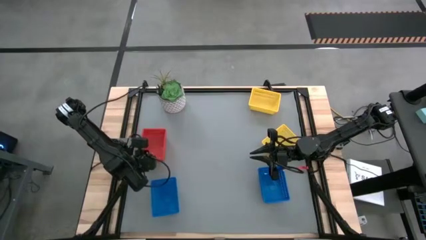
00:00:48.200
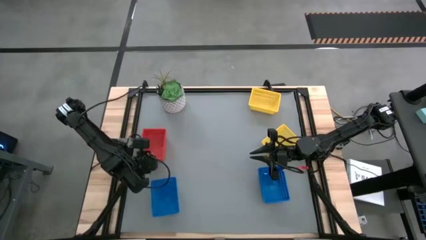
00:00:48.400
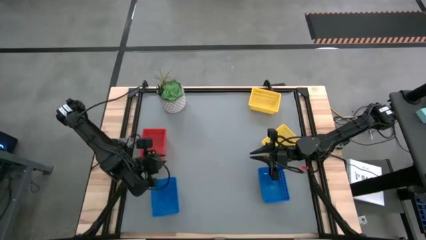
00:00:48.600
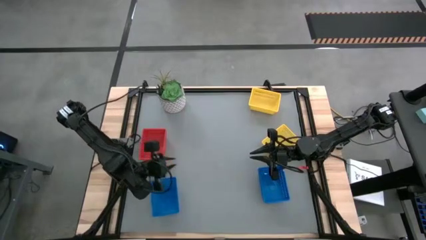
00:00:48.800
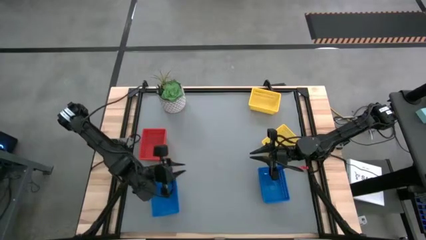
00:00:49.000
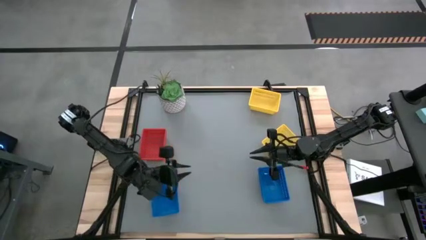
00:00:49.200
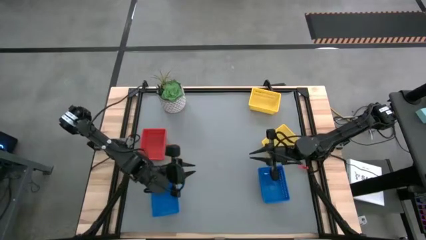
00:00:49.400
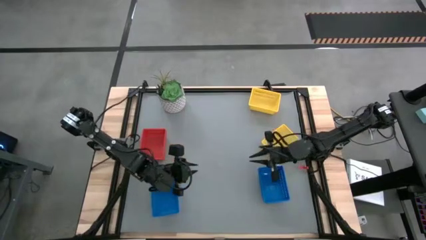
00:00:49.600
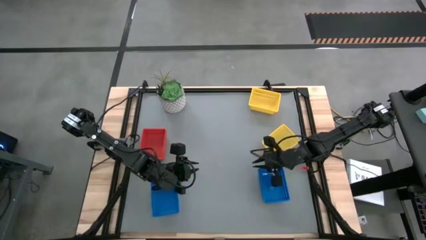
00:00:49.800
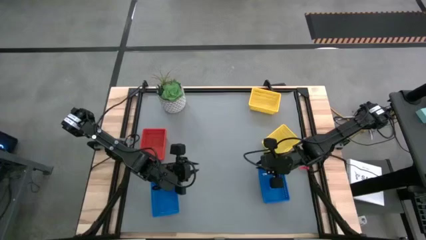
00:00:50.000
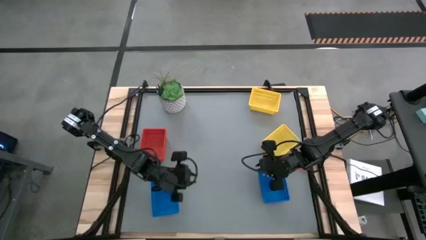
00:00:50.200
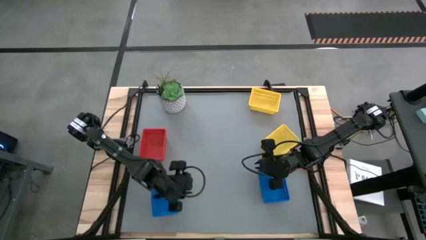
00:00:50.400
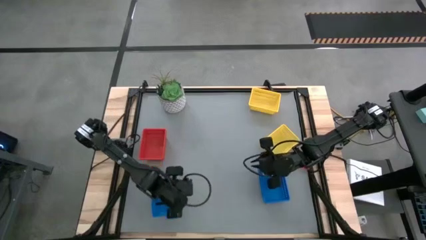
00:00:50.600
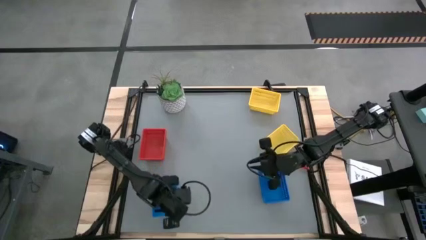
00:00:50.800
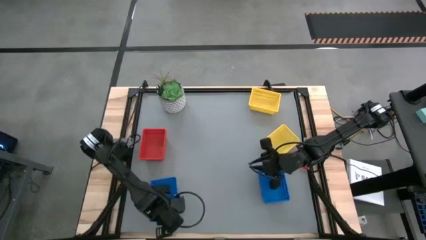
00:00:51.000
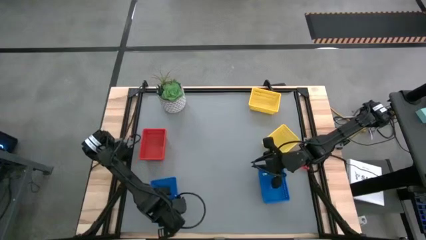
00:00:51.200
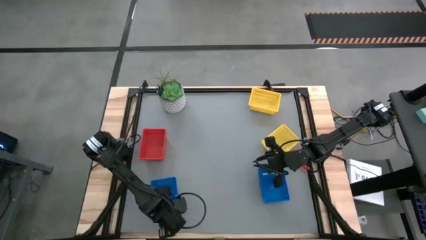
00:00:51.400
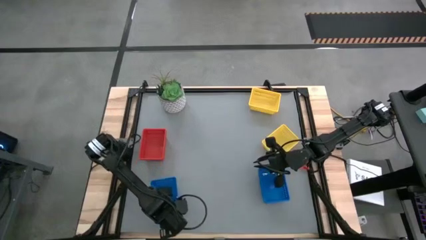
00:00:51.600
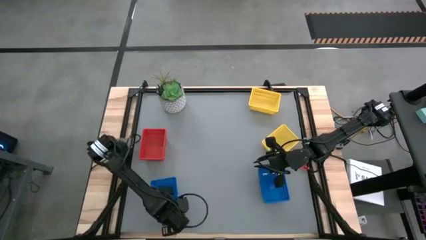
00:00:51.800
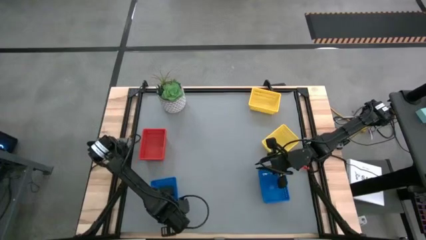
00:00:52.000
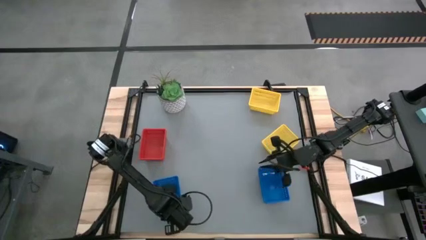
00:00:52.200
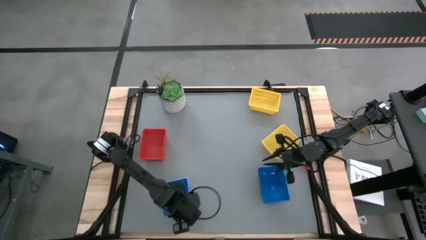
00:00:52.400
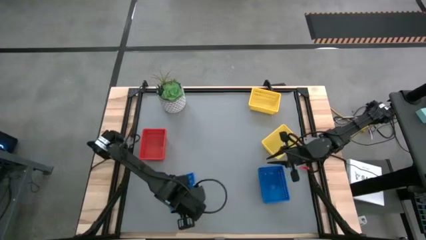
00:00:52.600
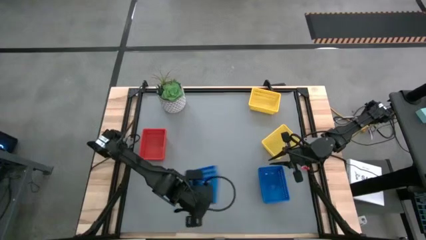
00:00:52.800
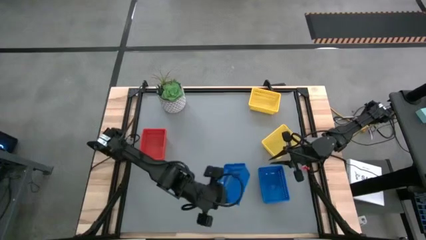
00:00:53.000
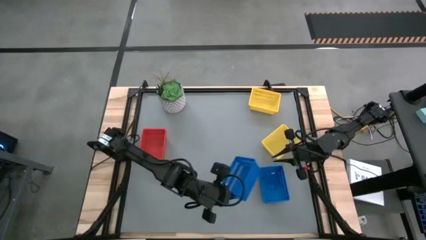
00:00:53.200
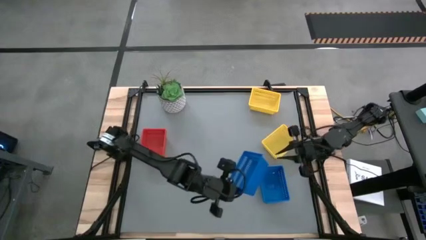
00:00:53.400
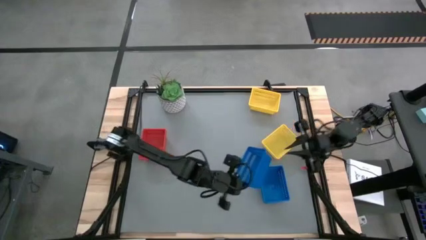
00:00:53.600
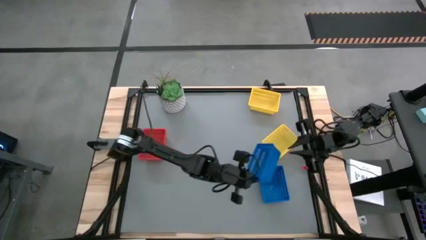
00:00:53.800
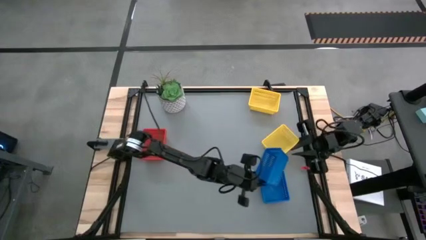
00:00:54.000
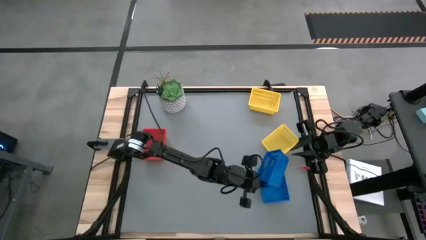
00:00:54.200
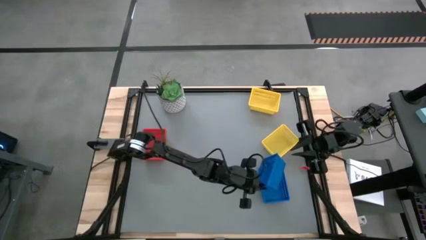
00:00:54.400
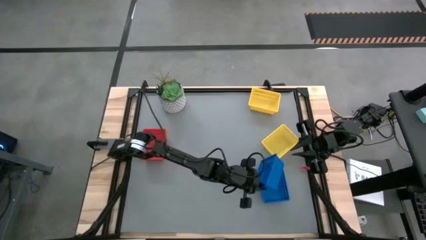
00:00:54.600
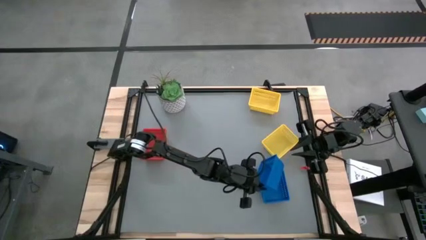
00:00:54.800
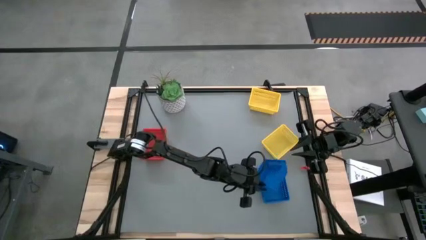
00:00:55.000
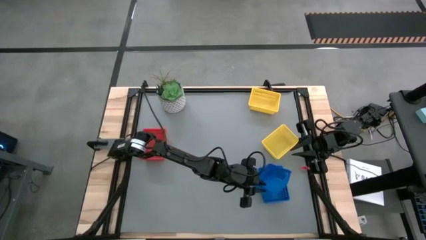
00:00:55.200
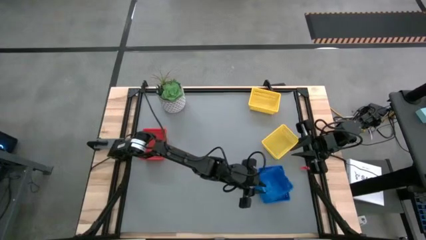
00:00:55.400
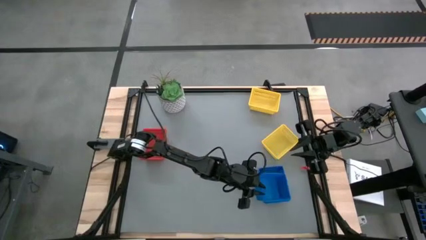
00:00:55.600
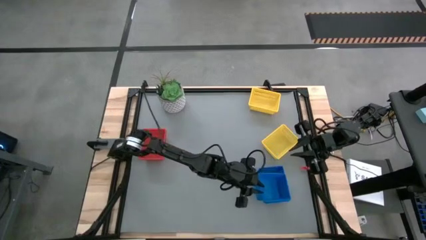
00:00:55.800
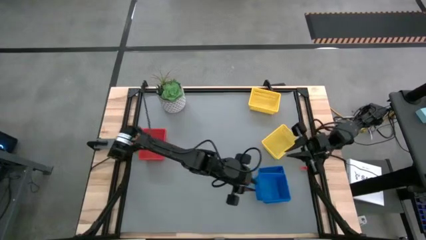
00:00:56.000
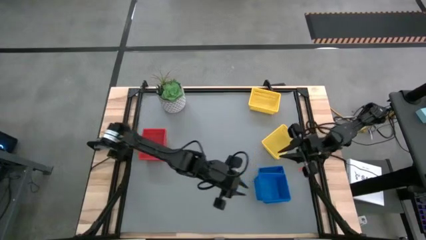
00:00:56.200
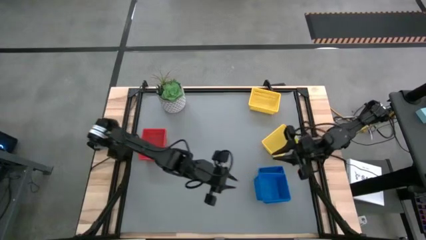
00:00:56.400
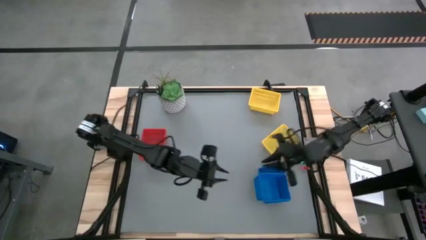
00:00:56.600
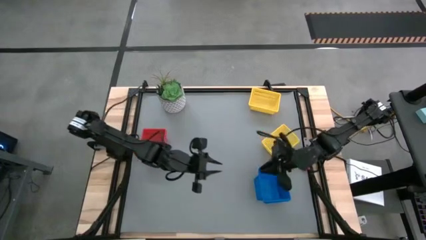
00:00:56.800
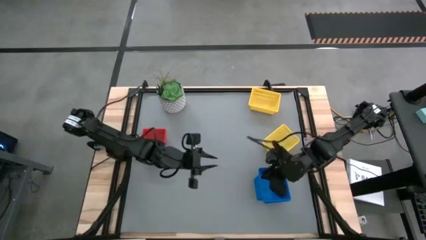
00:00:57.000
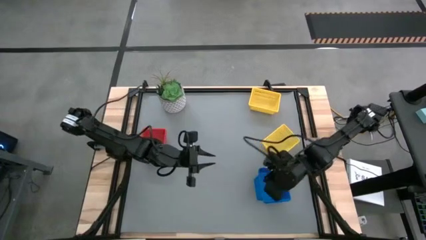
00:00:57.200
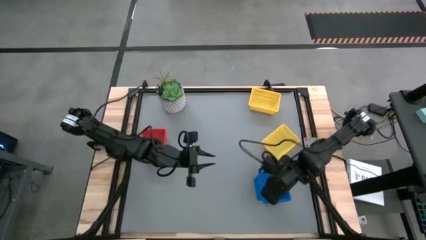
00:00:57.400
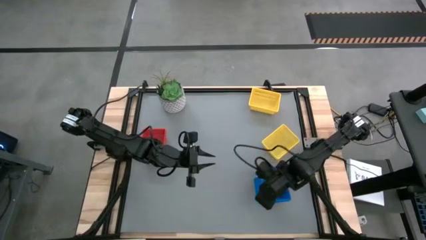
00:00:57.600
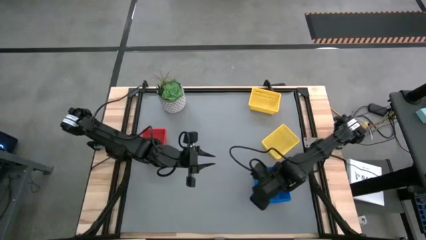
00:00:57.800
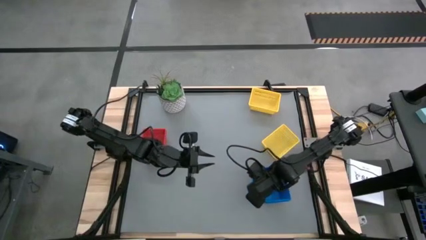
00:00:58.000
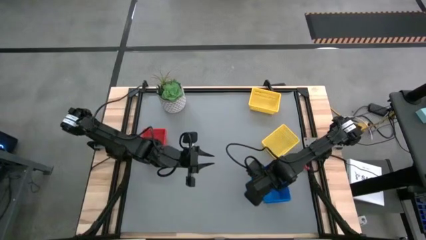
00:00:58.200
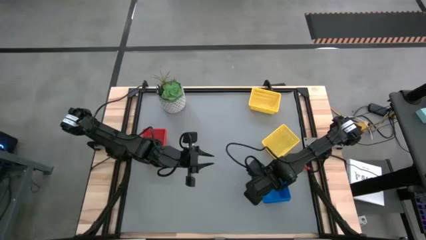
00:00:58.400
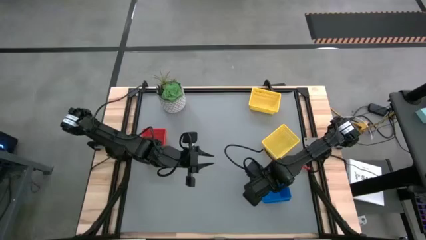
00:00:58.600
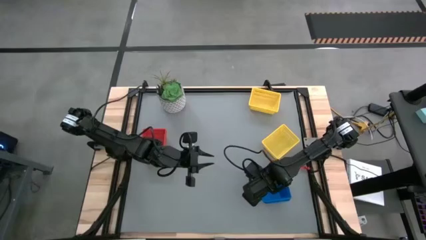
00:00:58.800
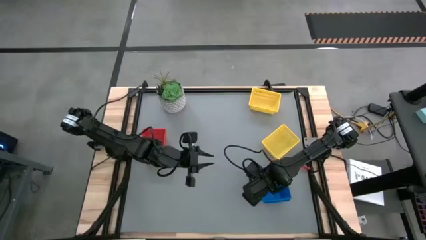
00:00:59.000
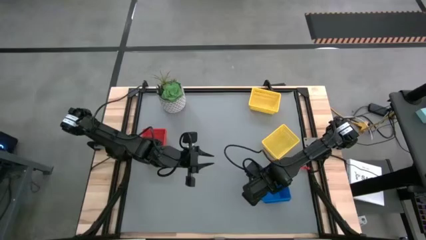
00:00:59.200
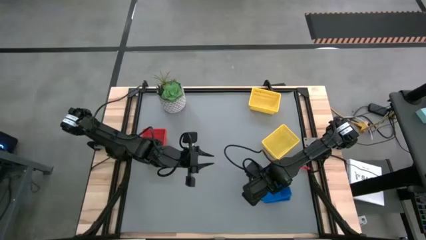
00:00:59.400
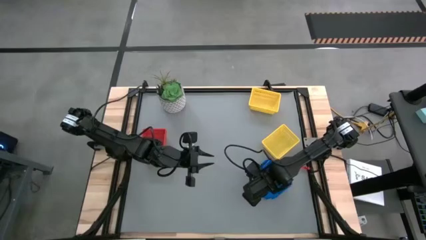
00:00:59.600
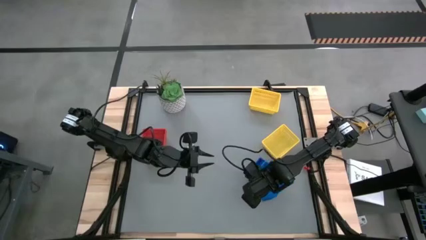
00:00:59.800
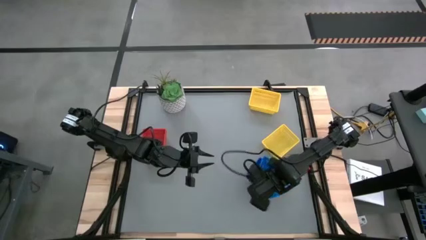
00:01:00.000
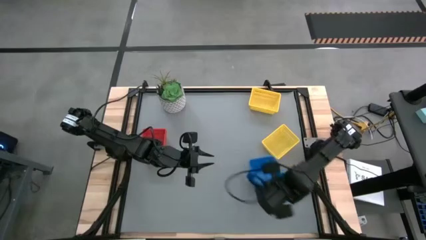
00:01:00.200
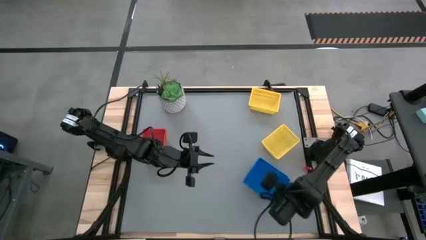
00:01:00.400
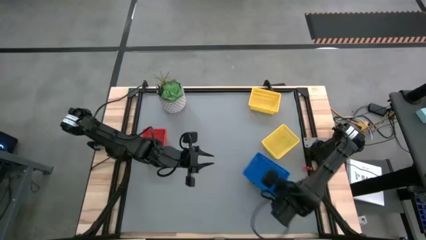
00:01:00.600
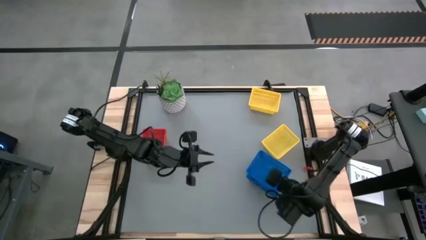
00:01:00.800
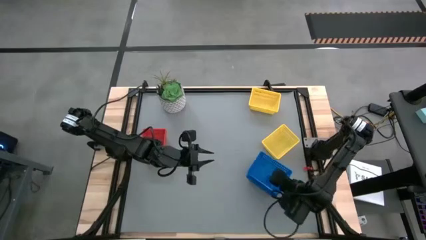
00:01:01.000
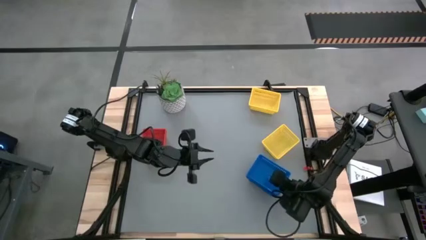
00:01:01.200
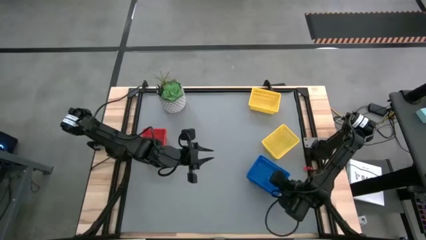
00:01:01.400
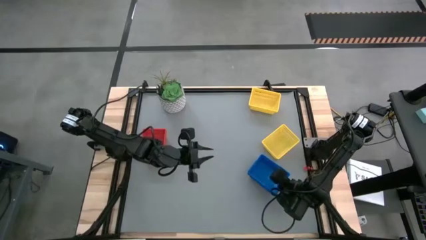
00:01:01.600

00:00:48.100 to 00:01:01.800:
Stack the left blue bin on top of the right blue bin

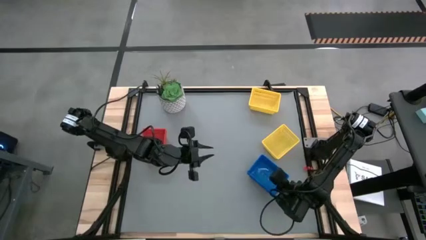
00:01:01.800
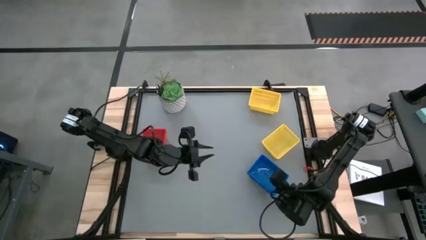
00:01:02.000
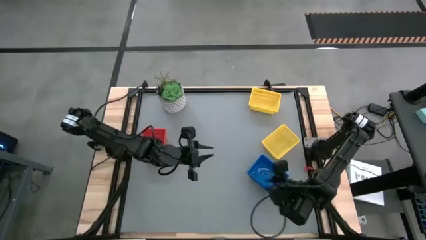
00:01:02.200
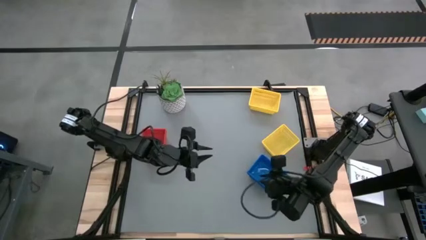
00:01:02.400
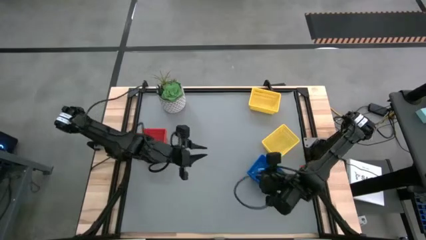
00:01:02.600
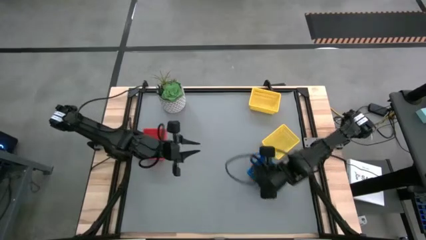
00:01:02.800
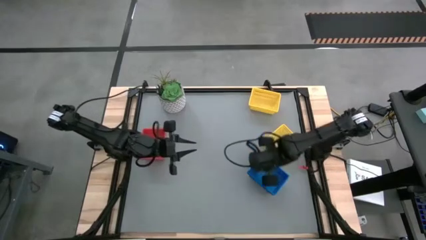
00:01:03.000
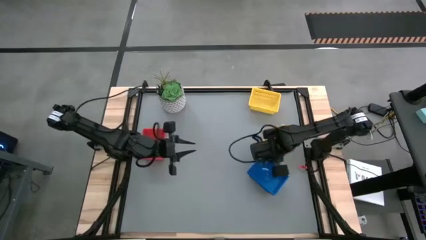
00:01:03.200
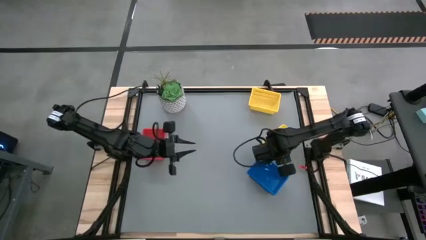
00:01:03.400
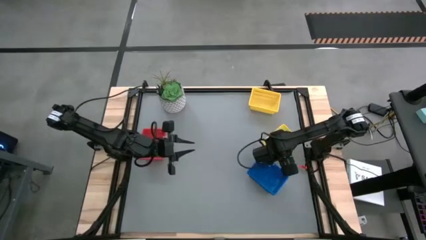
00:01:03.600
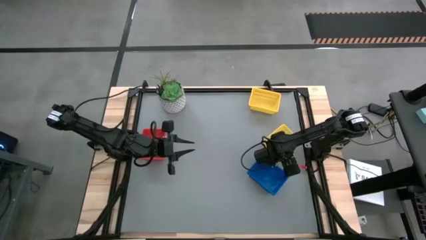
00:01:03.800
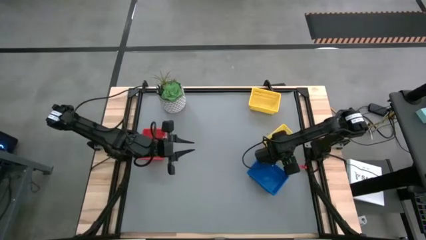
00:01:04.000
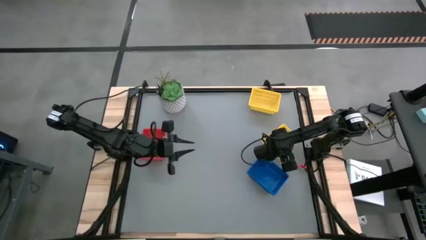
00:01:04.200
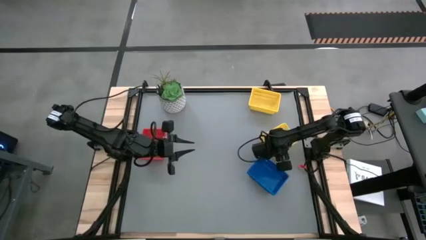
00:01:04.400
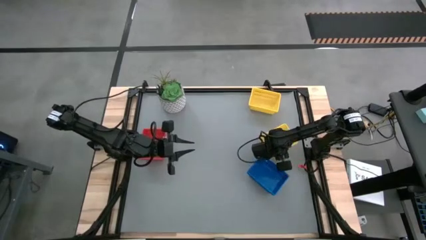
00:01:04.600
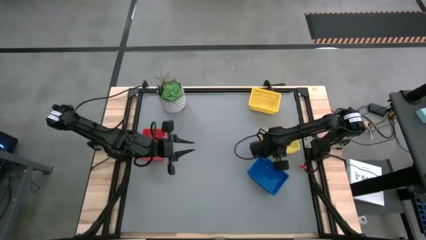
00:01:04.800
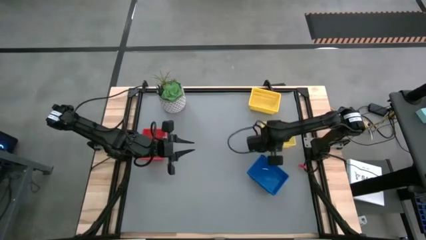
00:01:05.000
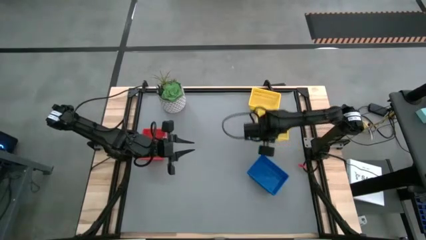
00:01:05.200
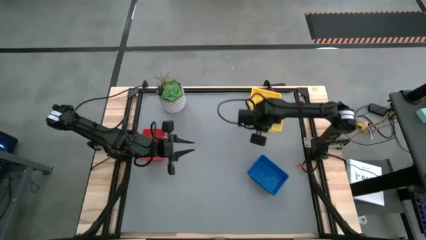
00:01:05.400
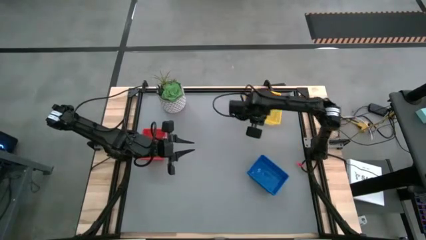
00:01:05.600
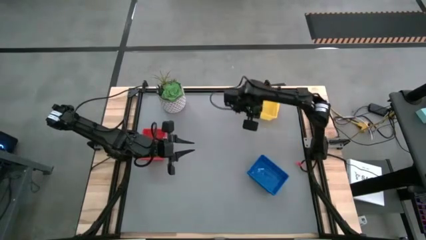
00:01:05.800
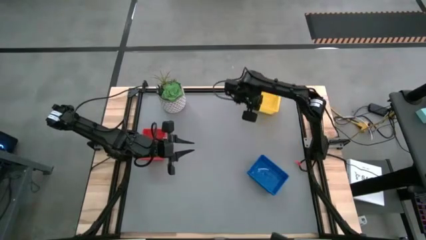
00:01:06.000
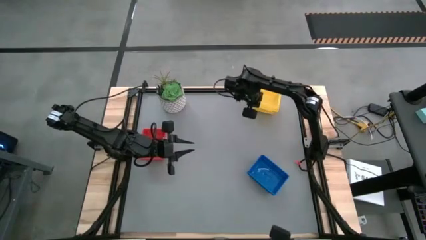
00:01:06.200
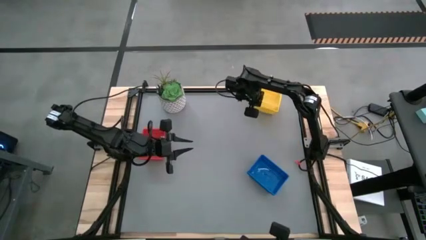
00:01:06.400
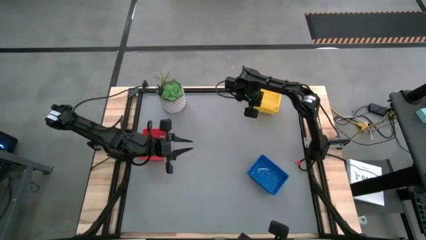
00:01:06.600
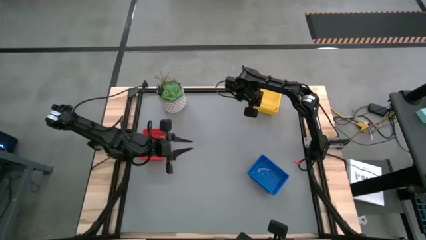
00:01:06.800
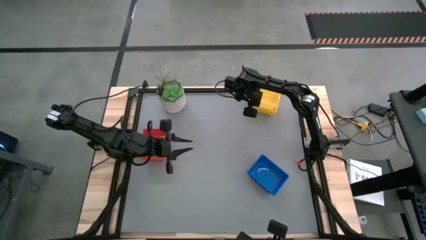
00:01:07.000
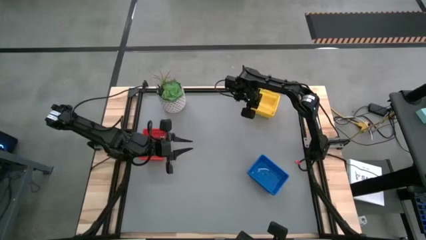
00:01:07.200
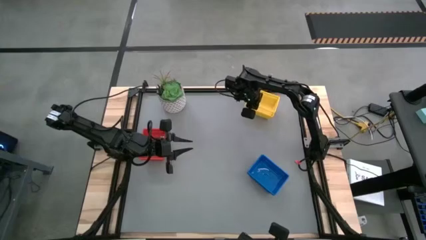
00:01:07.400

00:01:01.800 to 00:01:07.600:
Stack the bottom yellow bin on top of the top yellow bin
